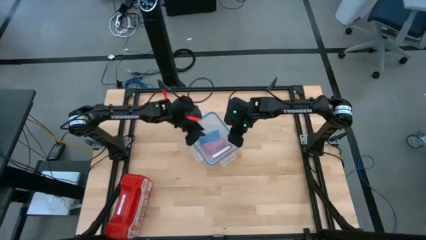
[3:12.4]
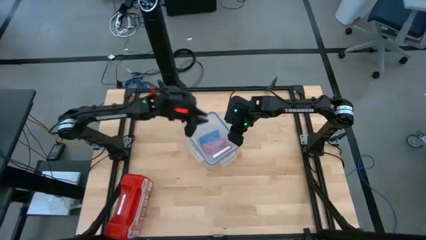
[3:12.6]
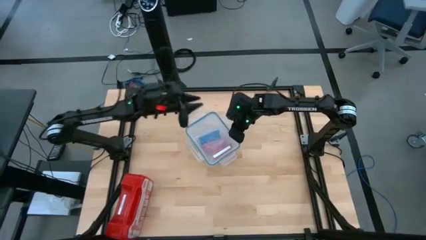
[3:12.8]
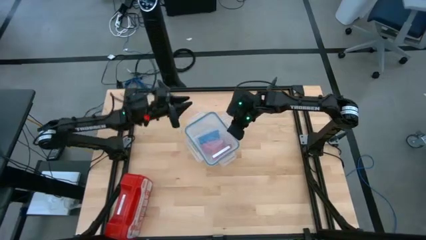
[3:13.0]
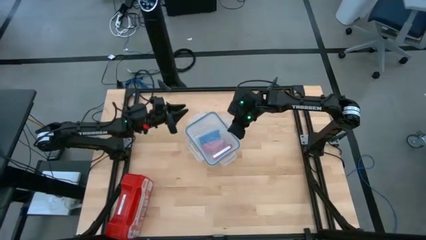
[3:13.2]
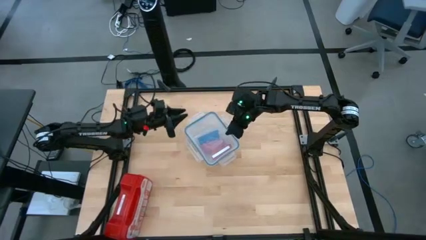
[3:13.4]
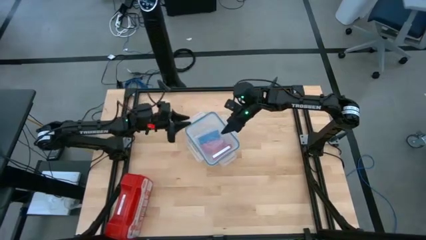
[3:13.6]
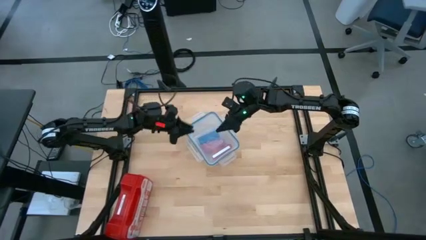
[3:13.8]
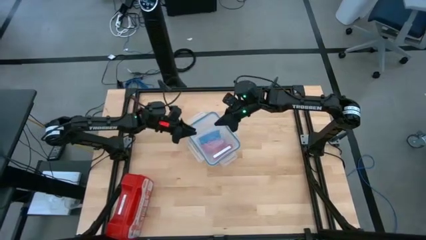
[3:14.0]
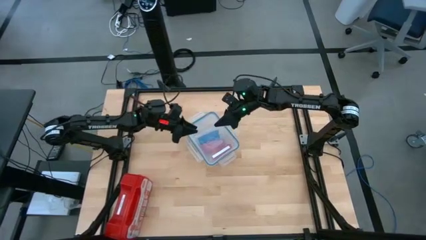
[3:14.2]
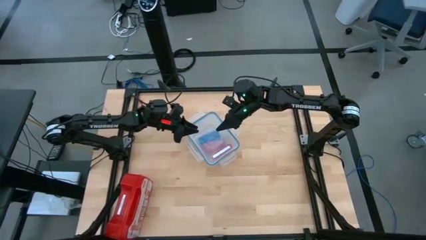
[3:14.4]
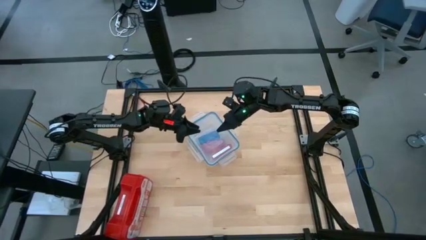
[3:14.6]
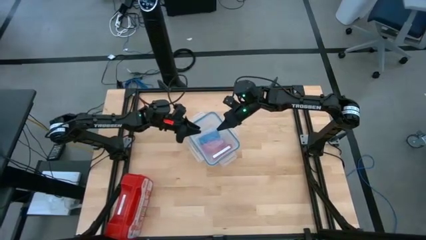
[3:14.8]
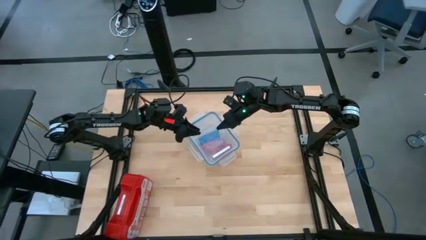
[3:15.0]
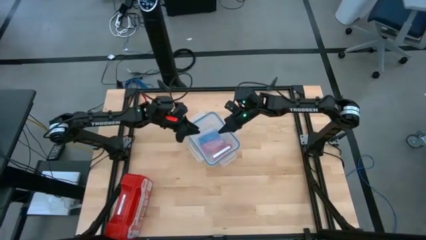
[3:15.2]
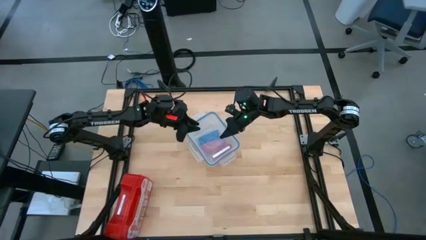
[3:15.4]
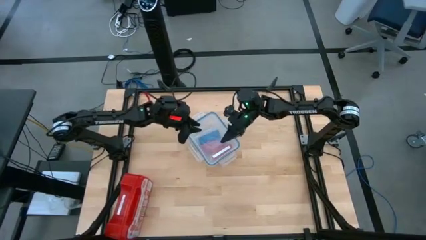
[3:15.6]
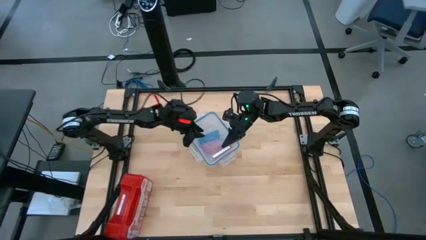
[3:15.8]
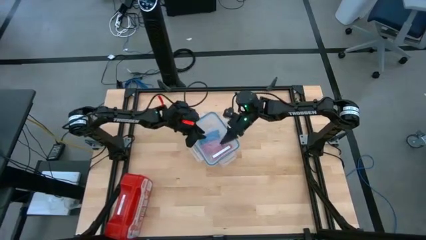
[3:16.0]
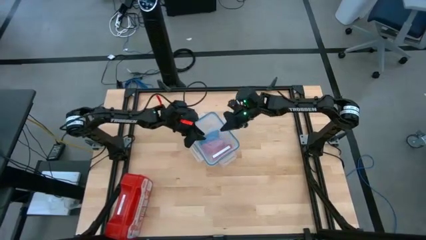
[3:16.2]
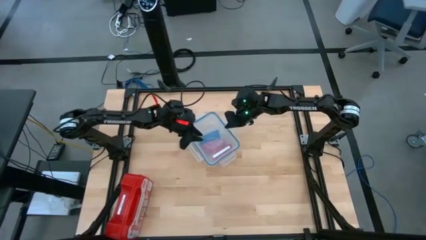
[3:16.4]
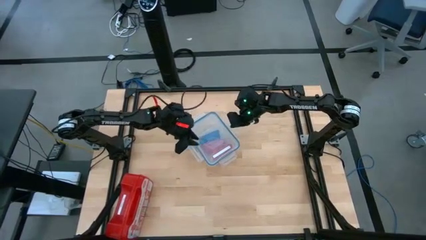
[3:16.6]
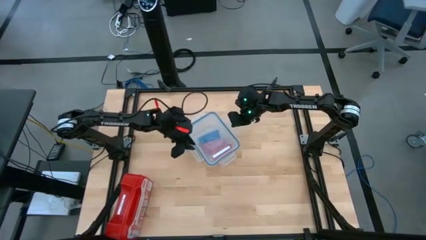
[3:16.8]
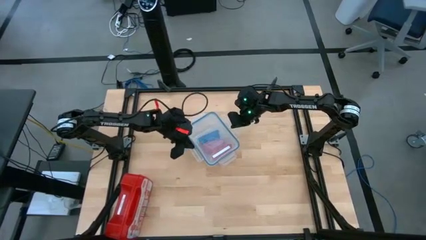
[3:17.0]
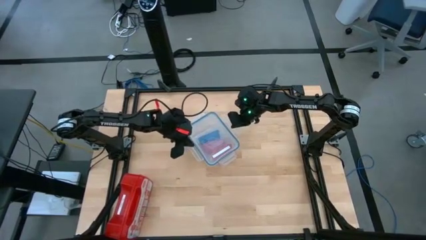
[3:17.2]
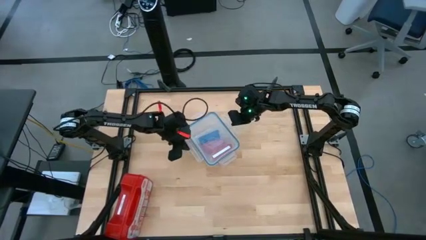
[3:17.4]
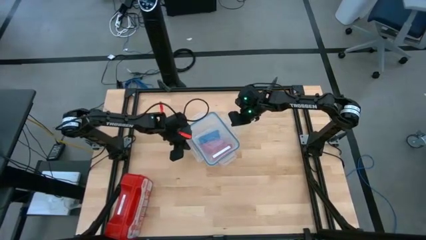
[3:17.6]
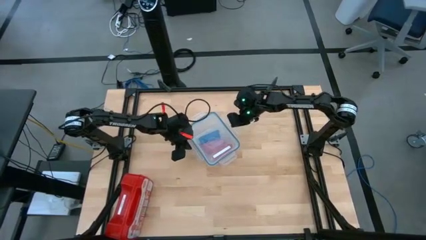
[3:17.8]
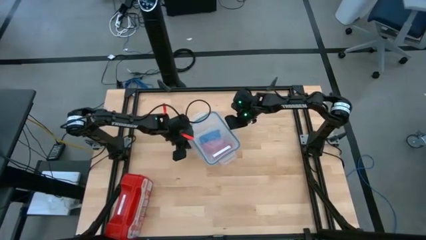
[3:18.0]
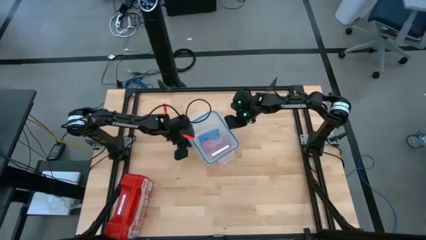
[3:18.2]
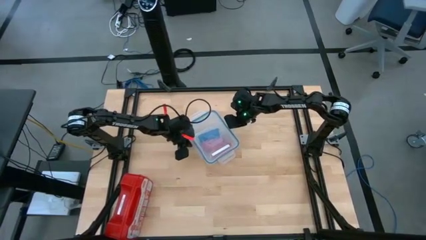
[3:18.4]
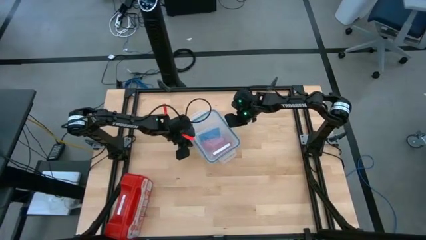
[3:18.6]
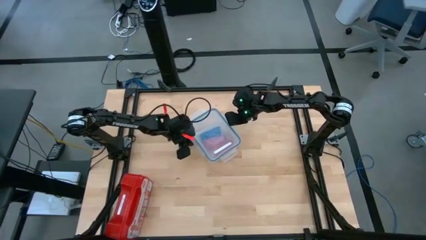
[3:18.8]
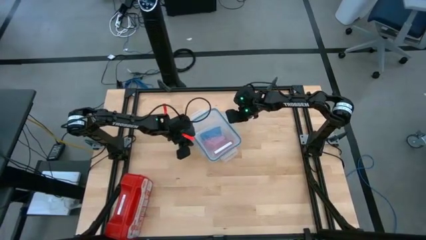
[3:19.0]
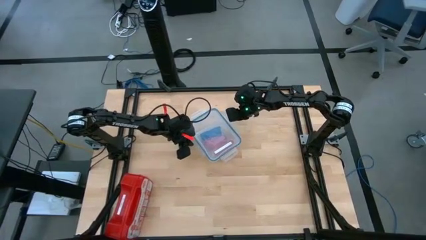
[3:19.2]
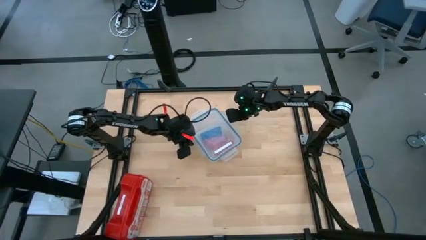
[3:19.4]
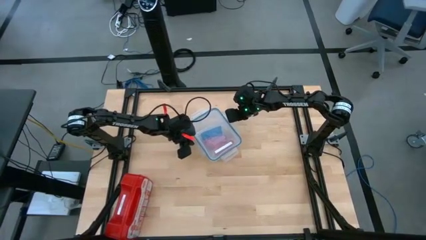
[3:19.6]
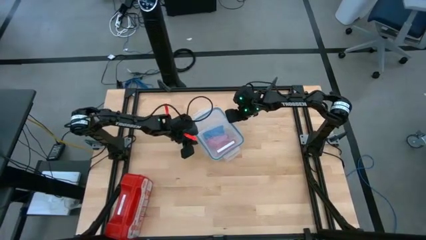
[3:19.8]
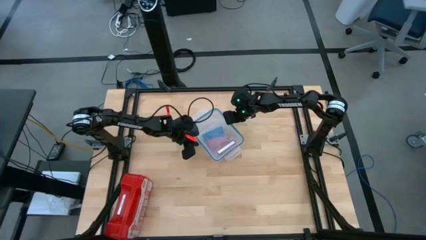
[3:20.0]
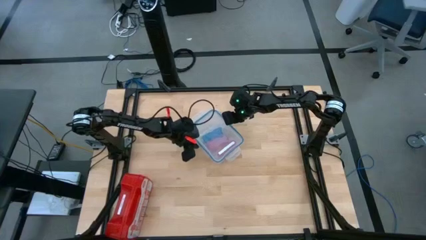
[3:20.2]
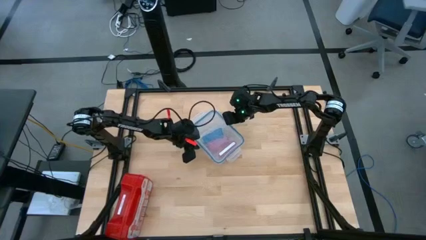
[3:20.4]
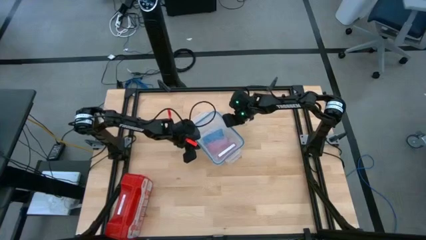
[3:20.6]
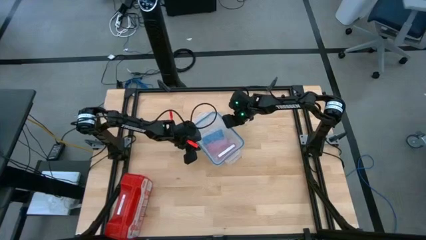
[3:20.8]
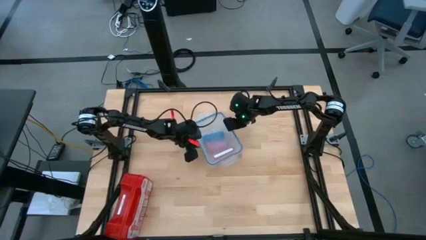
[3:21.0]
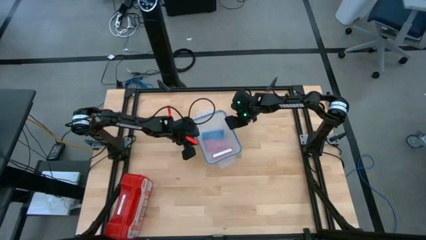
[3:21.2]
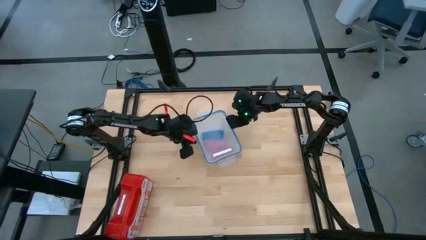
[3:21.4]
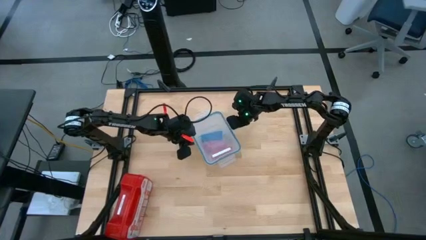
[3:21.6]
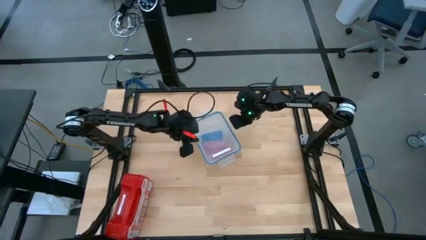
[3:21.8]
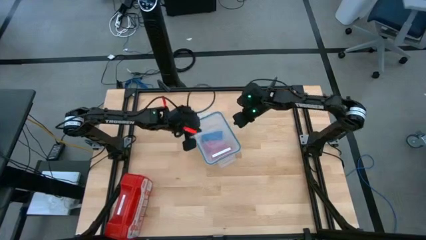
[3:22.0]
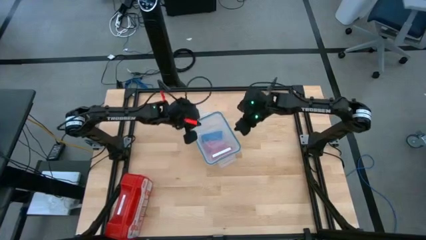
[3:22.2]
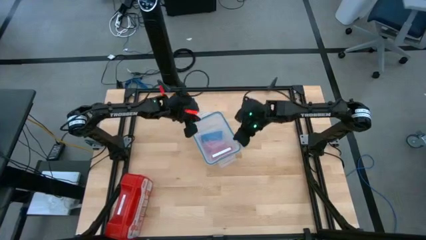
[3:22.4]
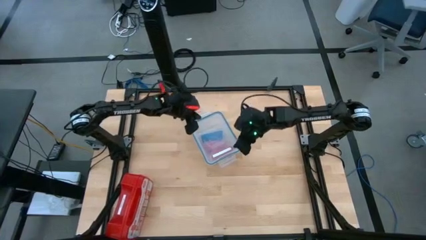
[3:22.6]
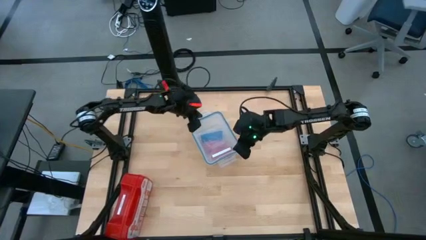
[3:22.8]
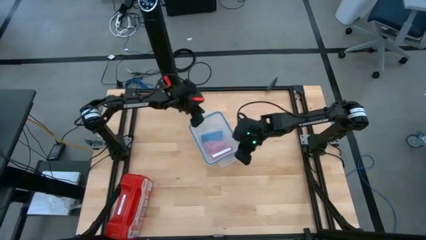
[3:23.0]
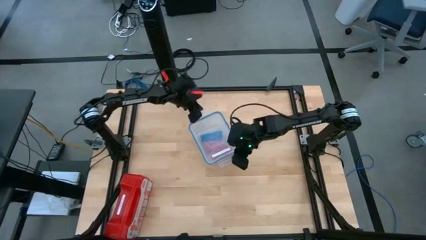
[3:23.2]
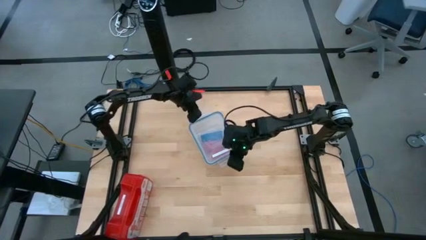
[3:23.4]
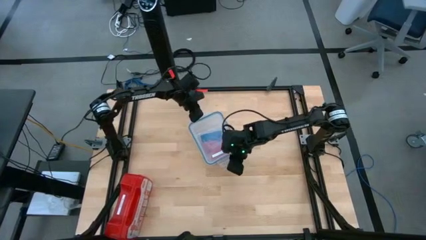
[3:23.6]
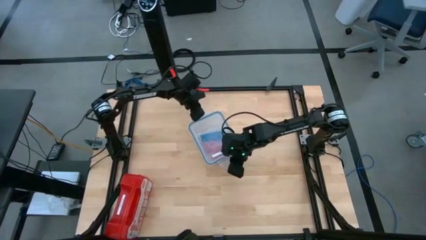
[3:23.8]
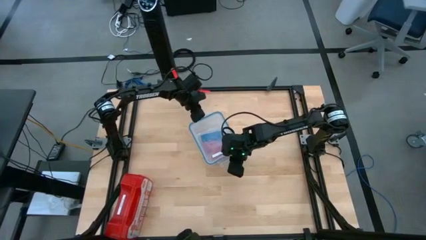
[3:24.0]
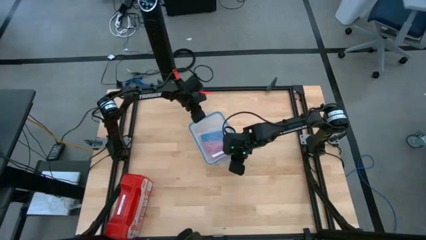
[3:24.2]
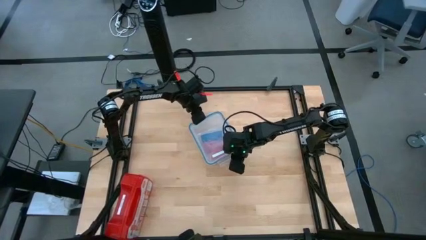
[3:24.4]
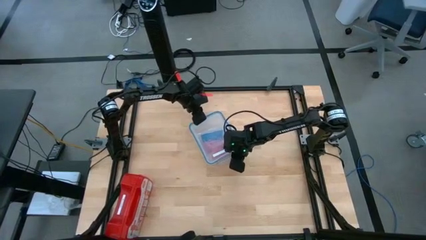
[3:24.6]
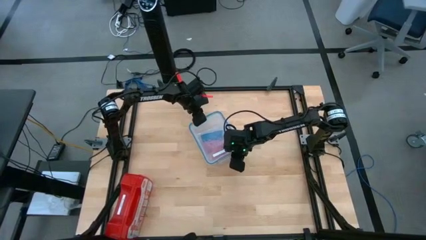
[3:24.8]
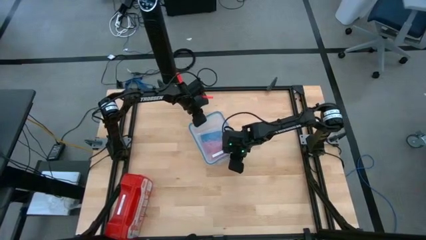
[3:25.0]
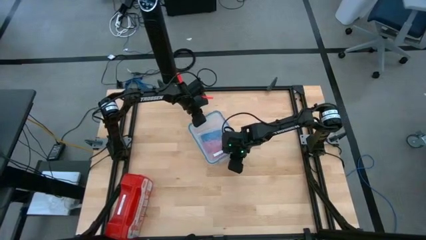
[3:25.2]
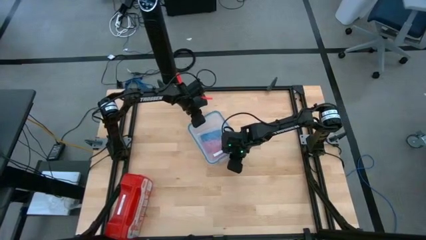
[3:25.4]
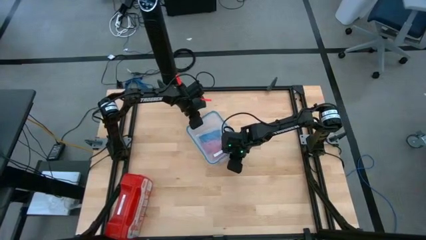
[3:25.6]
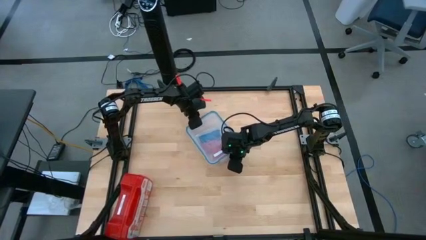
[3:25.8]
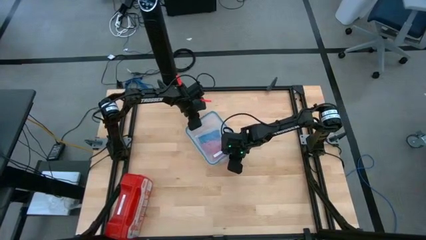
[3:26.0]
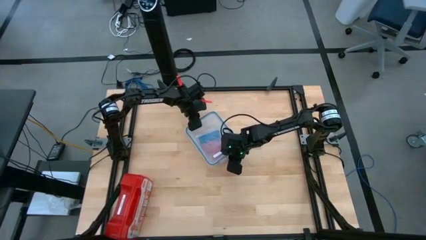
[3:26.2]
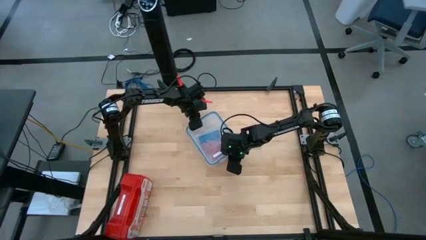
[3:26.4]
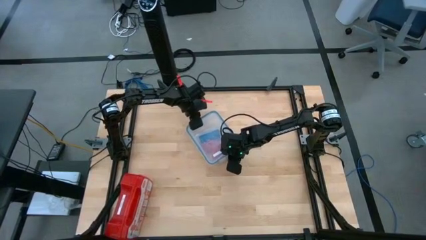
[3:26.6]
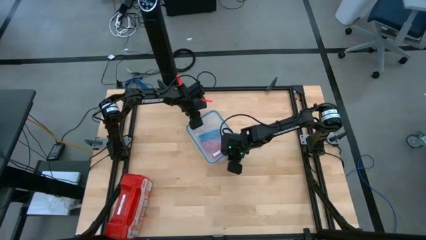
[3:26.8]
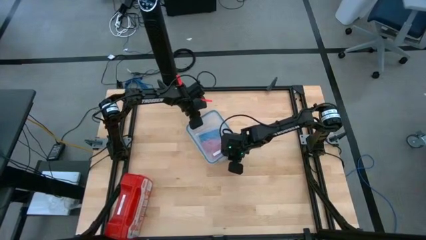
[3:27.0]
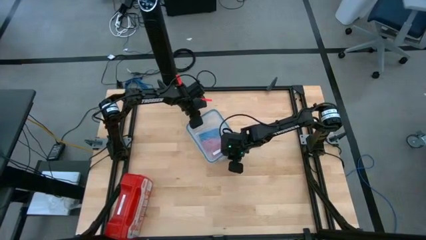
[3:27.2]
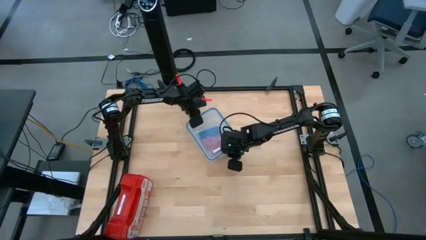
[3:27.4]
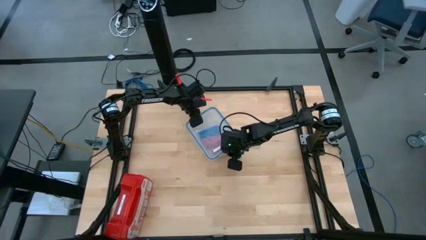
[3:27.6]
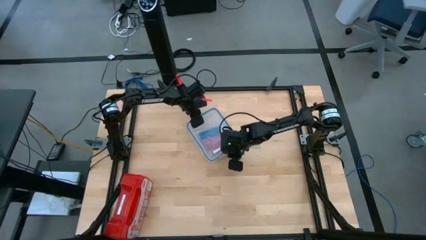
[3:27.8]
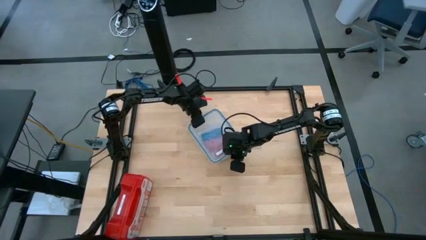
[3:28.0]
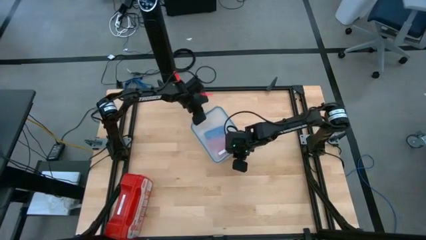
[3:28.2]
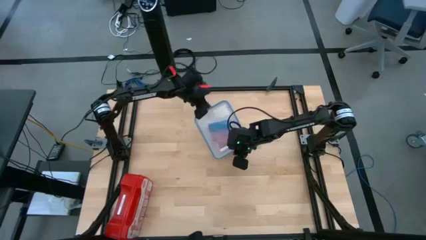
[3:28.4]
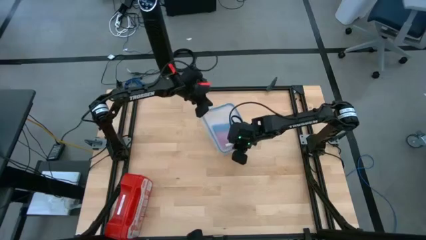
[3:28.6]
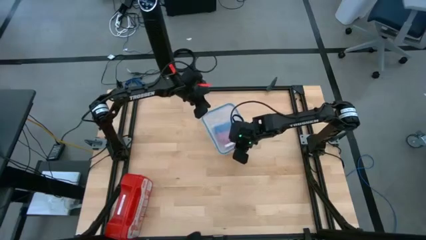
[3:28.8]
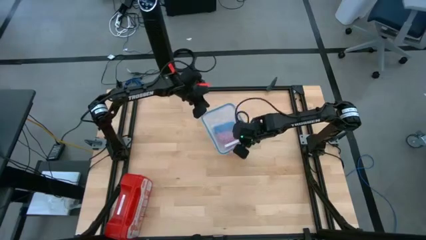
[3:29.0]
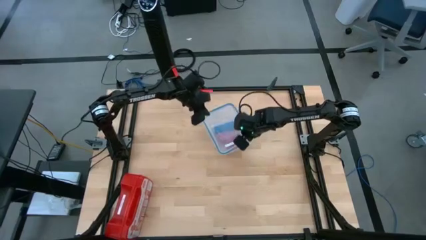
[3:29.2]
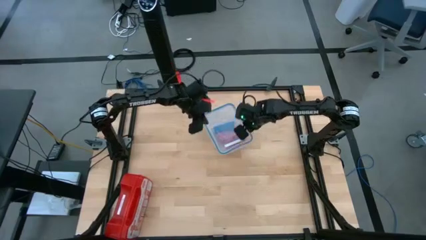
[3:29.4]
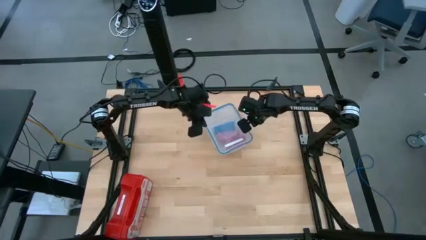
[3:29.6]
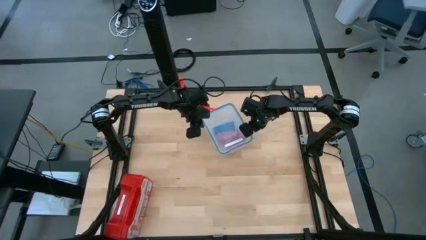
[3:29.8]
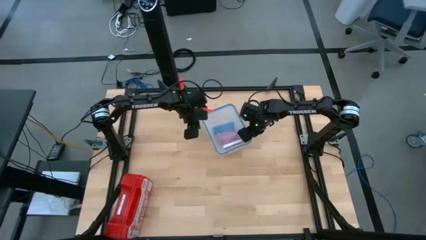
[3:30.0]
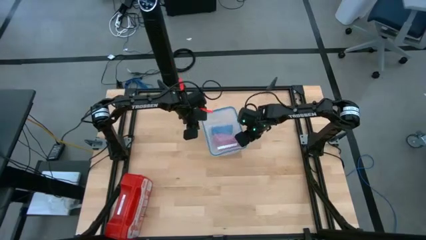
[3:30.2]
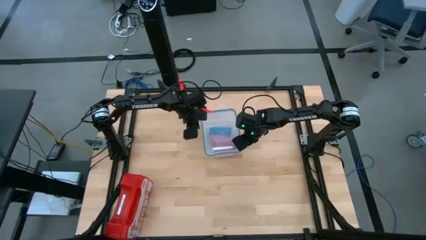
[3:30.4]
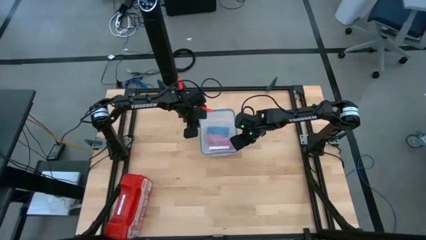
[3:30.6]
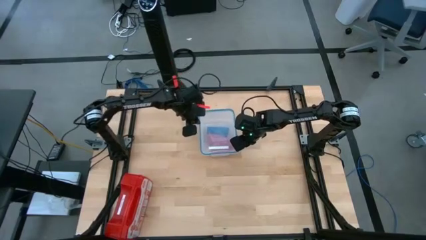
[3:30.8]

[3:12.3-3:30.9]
Task: Roll bandage
Close the lid of the tupperware
